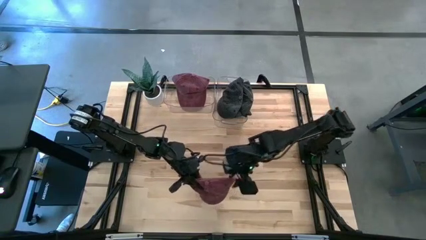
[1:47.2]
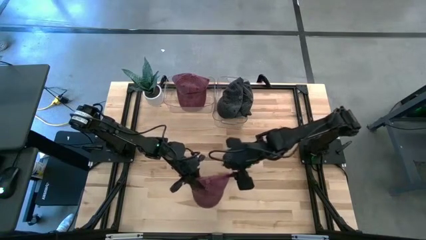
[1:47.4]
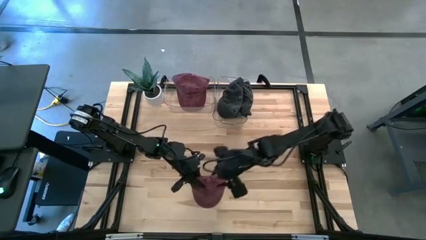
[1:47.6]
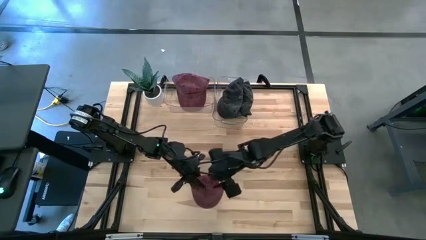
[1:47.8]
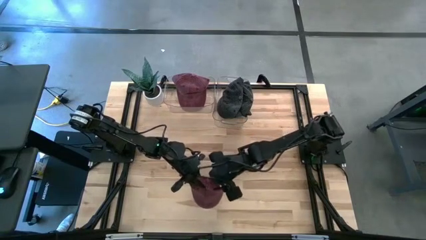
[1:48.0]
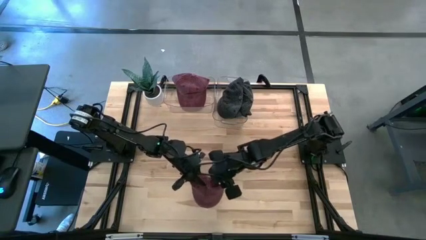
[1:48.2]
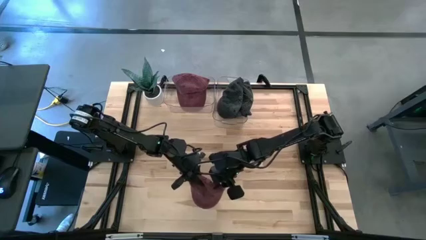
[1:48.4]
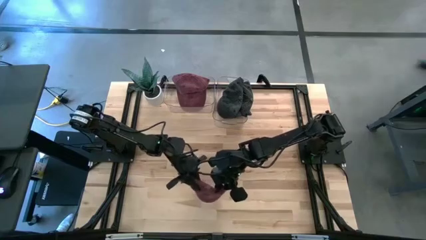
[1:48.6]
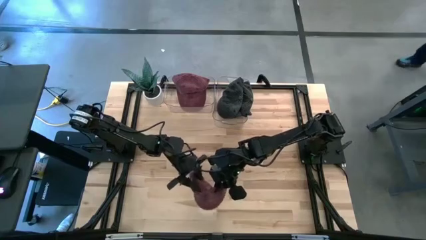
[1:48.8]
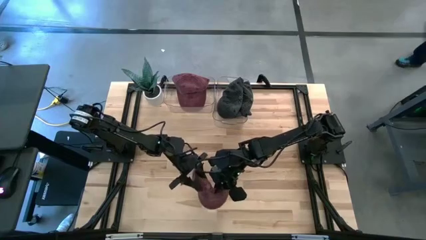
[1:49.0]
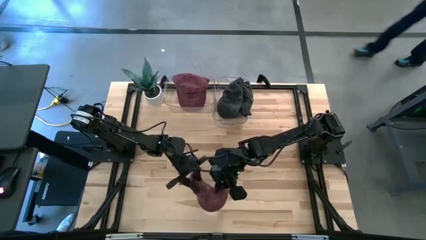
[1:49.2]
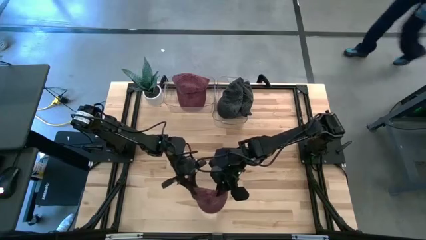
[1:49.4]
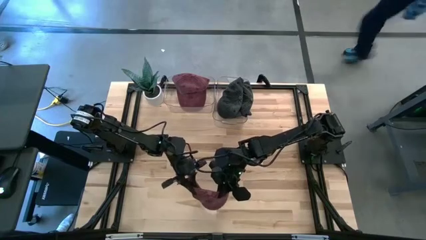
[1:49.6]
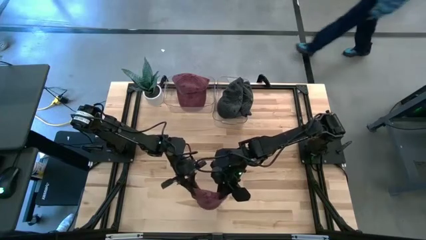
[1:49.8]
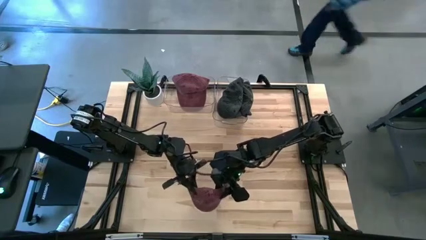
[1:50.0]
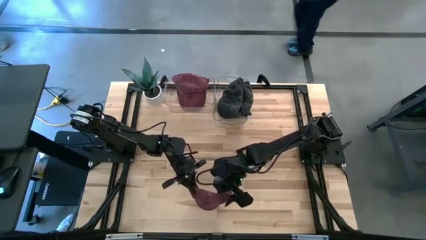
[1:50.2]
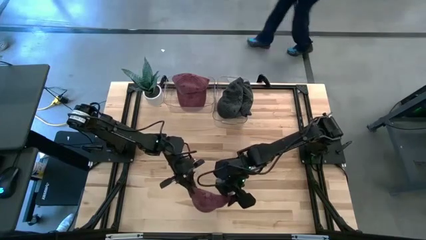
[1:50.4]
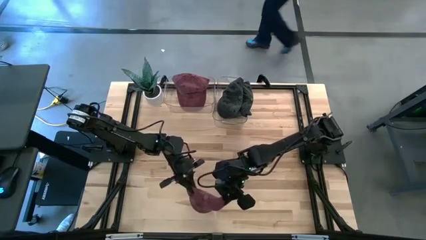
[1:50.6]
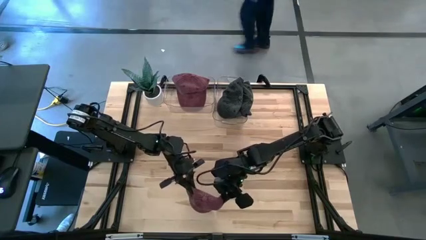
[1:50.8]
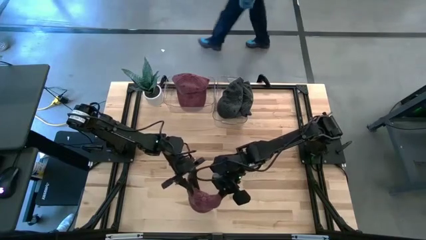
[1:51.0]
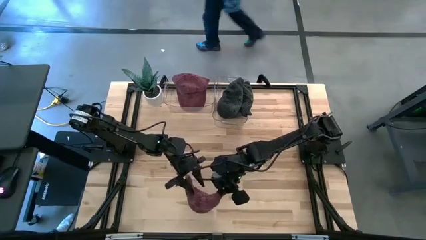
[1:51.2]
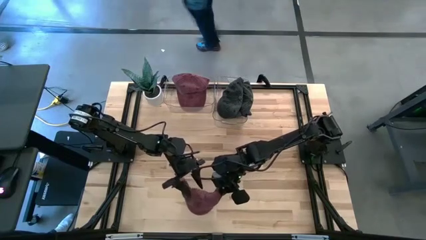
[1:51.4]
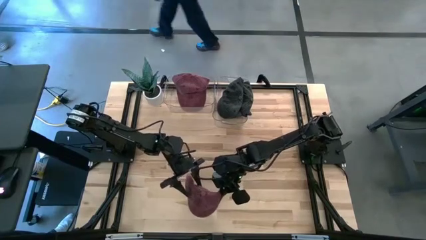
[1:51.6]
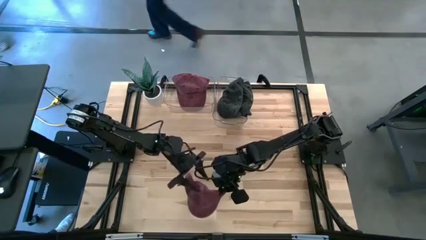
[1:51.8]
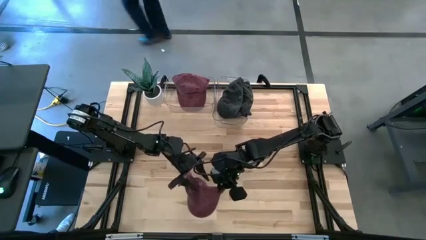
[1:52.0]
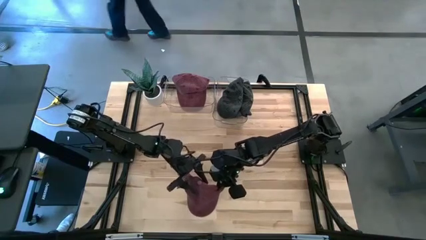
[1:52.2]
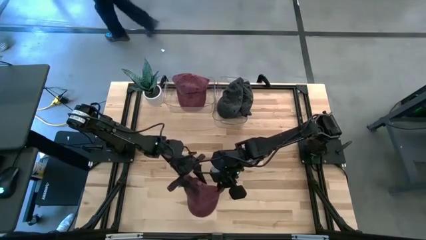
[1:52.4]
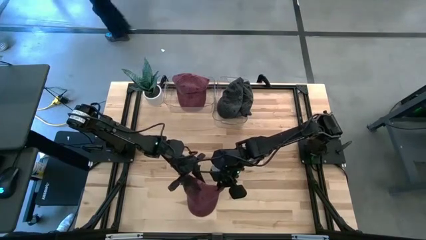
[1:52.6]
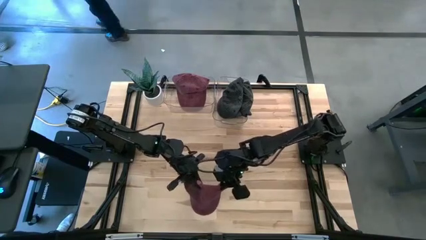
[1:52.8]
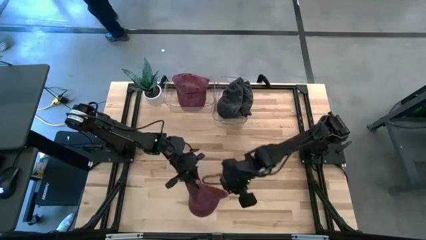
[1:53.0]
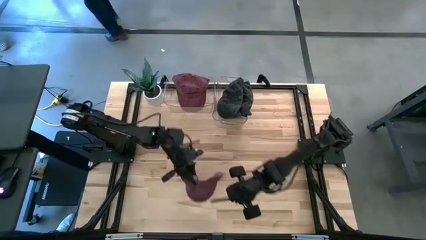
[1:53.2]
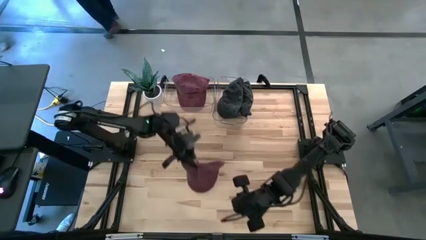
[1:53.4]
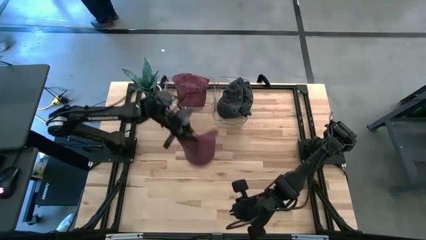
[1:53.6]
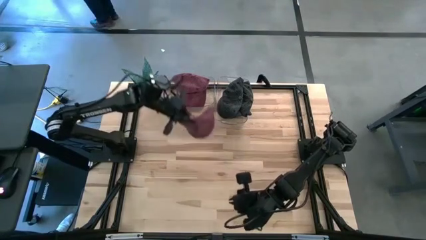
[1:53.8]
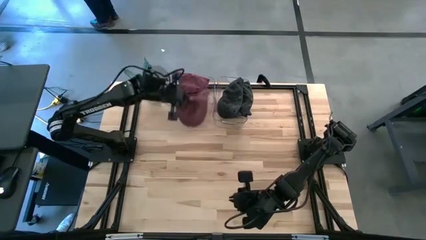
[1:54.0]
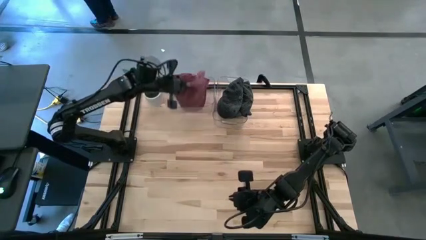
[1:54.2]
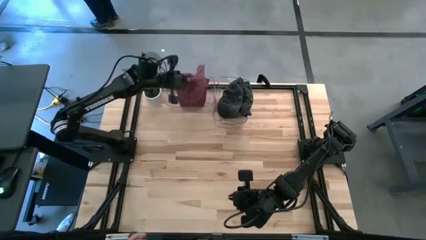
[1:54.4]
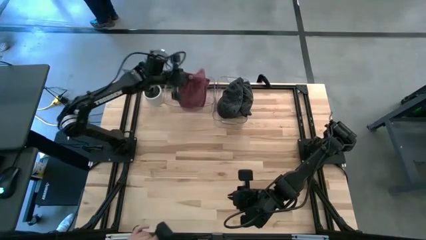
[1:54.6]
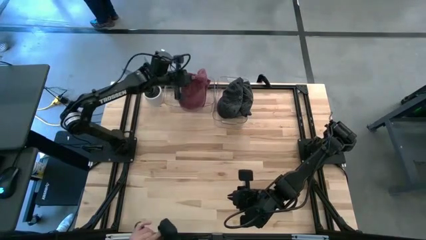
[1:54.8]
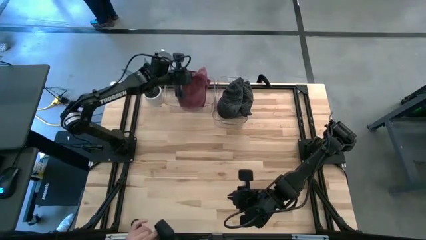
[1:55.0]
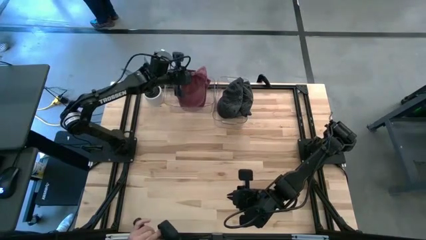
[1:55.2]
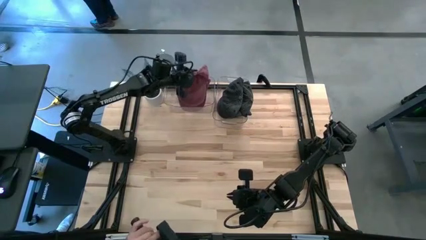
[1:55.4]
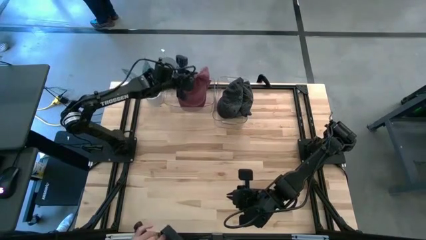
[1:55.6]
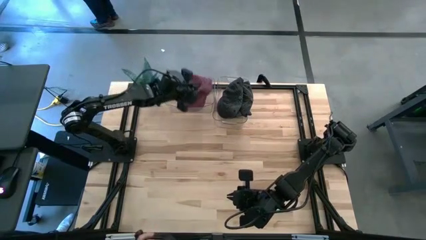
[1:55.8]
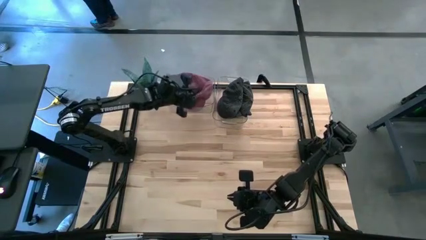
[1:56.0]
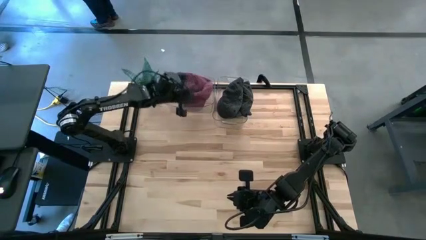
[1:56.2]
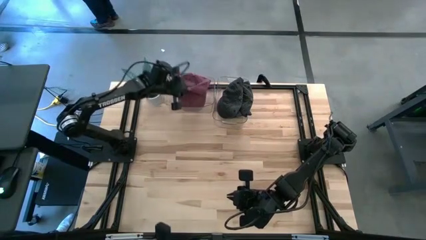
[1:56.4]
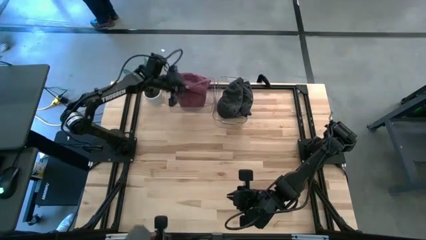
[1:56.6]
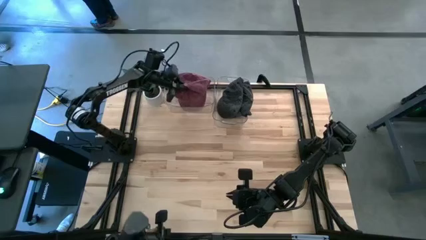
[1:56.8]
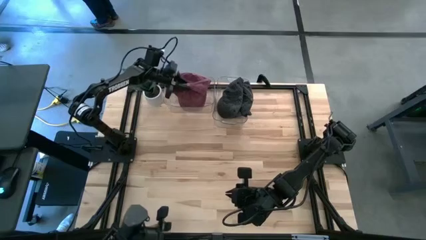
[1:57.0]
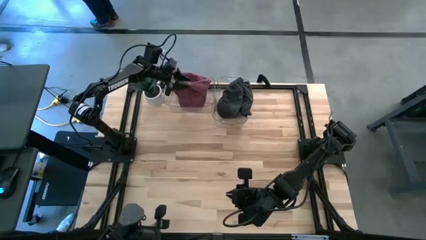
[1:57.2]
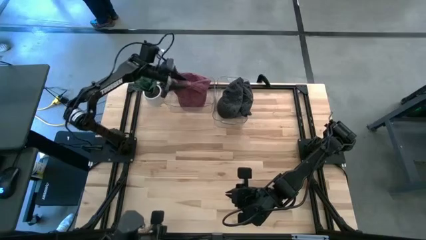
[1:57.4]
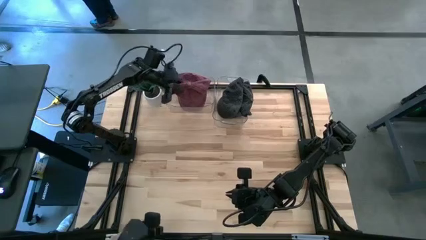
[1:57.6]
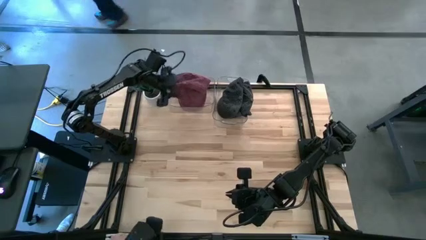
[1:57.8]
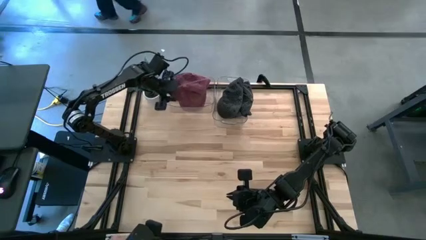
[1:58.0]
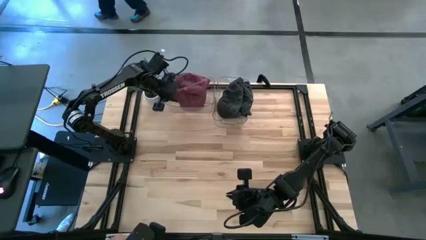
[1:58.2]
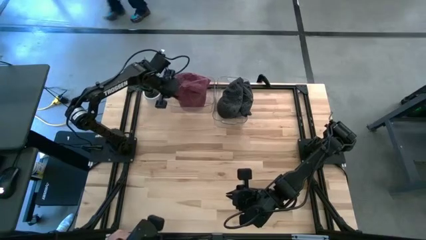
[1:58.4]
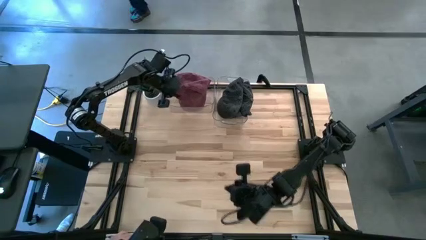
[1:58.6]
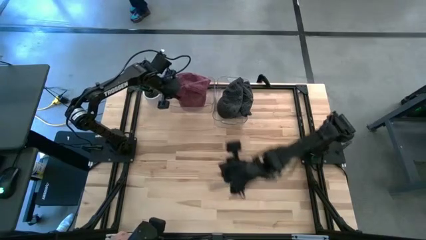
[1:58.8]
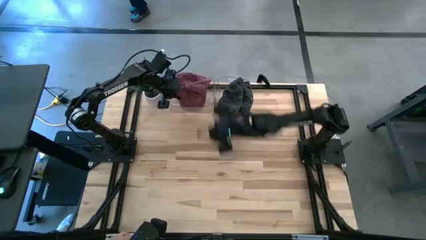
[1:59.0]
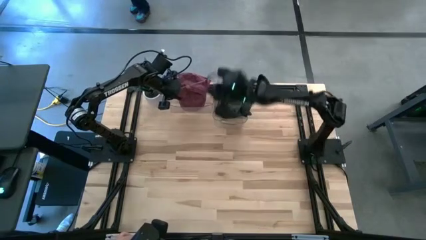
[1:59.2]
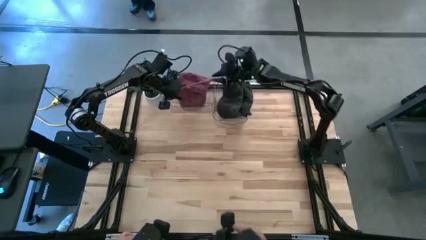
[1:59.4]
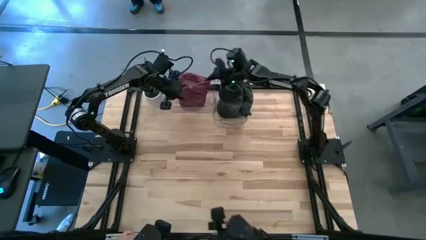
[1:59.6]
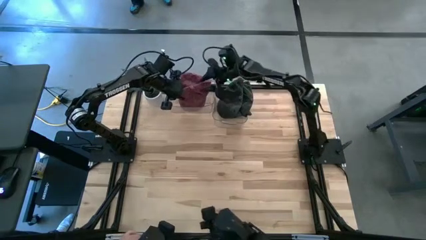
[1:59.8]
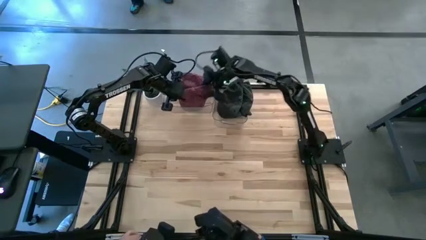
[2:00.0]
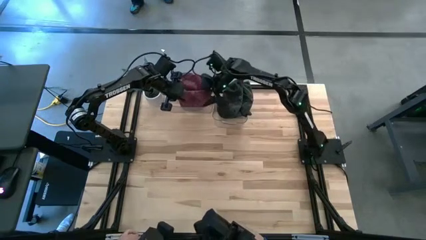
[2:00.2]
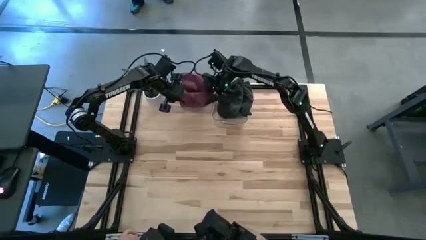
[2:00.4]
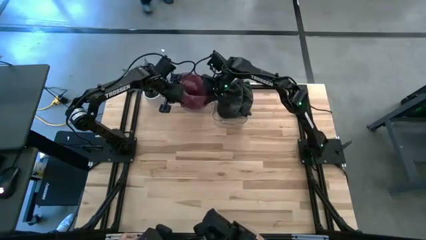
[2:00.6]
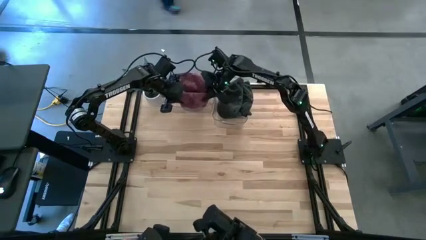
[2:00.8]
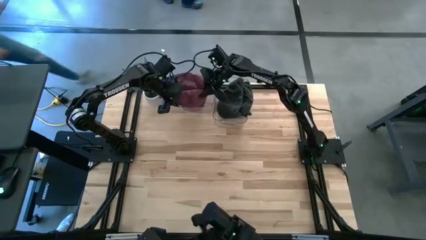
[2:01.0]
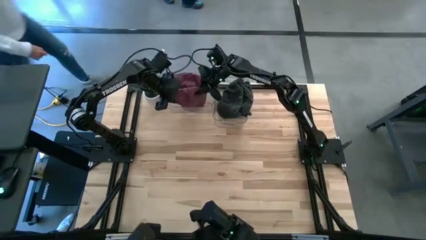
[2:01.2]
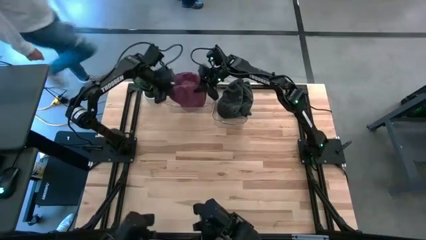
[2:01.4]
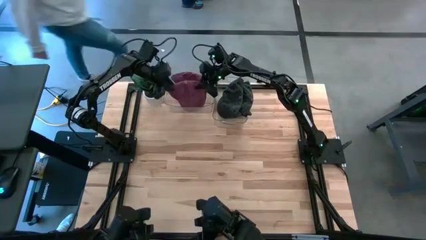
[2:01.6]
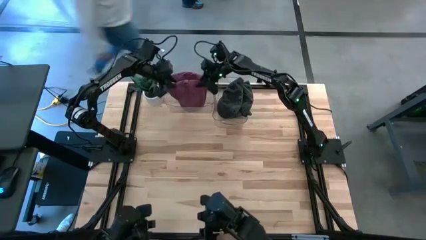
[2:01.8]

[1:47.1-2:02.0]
Task: Pick & Place hat
Put the red cap into the left transparent bin
